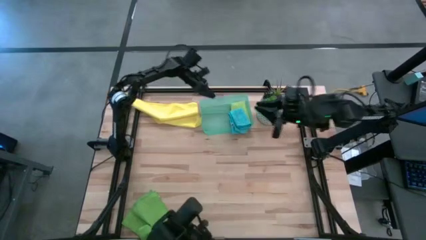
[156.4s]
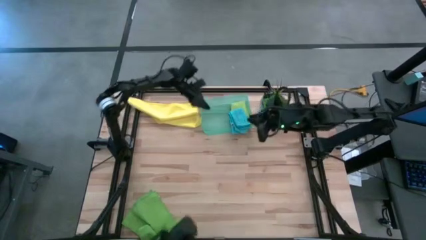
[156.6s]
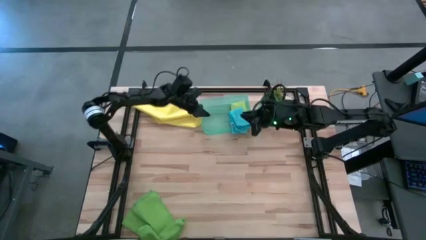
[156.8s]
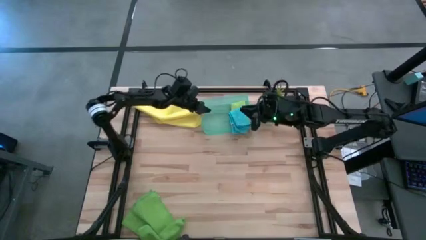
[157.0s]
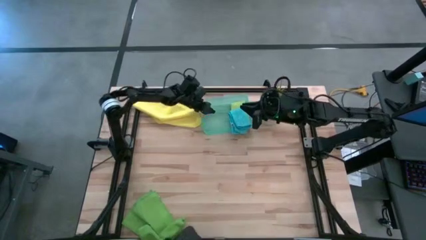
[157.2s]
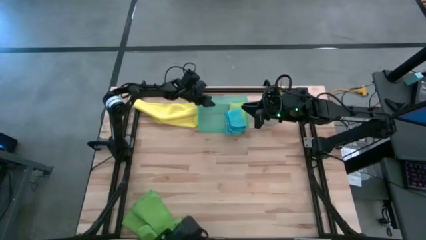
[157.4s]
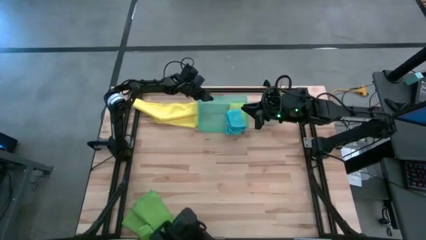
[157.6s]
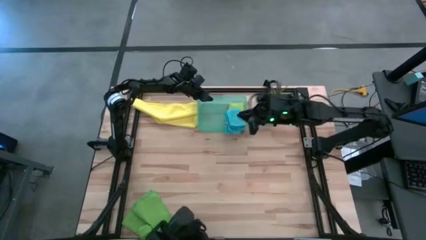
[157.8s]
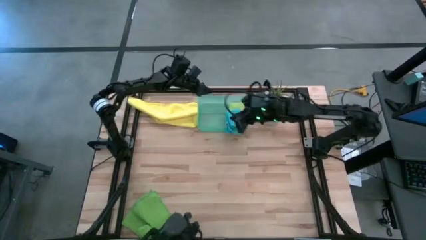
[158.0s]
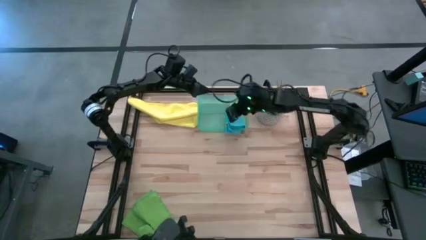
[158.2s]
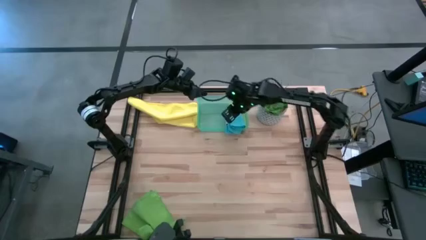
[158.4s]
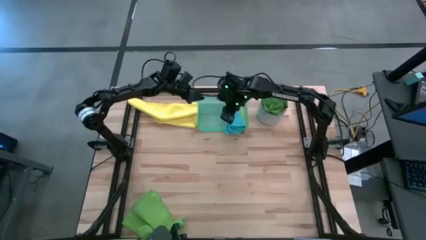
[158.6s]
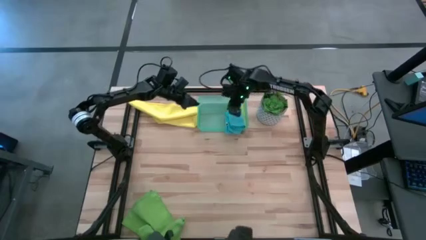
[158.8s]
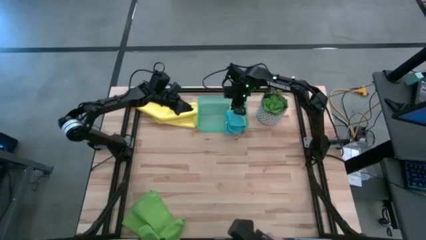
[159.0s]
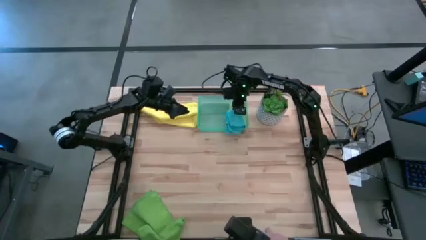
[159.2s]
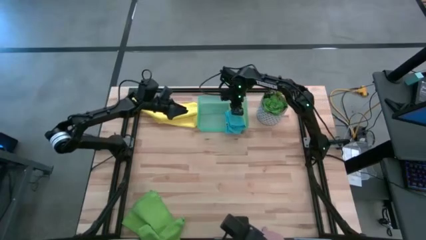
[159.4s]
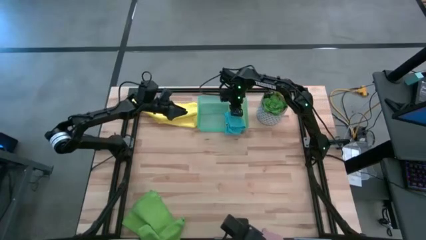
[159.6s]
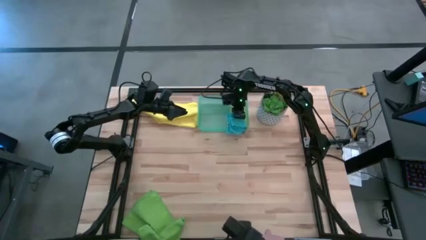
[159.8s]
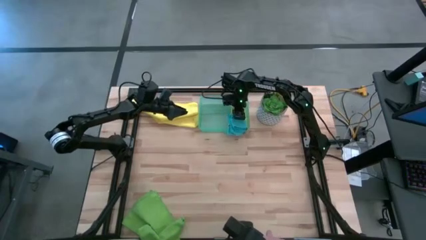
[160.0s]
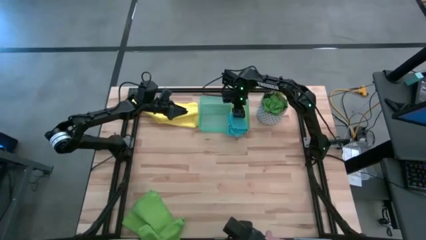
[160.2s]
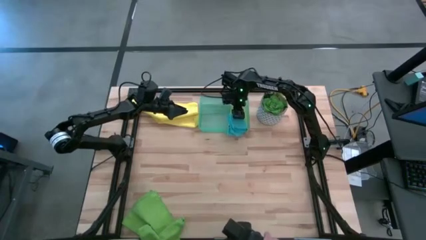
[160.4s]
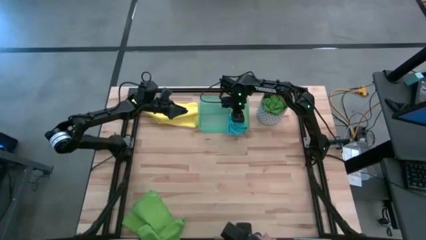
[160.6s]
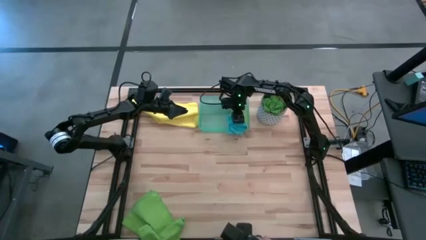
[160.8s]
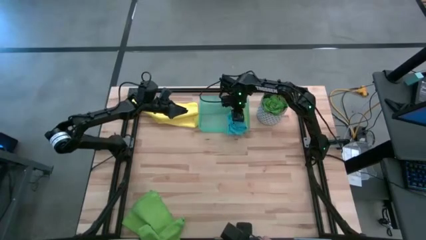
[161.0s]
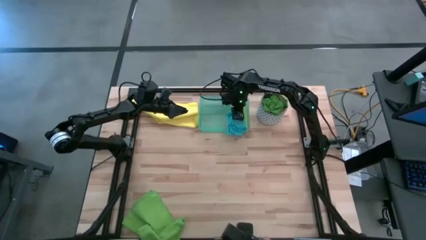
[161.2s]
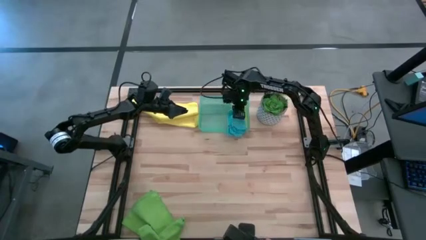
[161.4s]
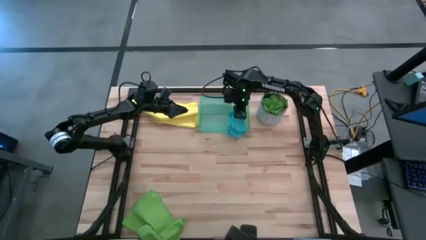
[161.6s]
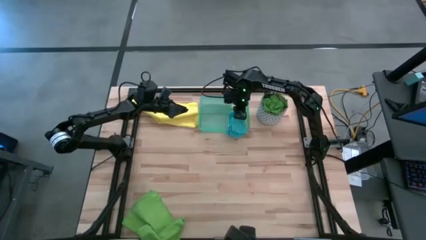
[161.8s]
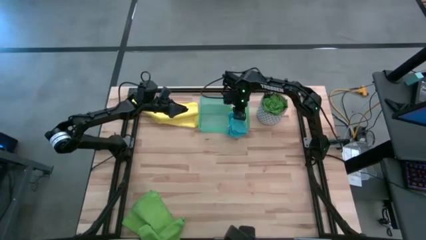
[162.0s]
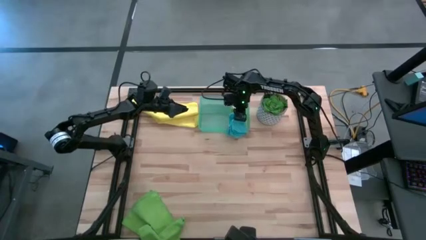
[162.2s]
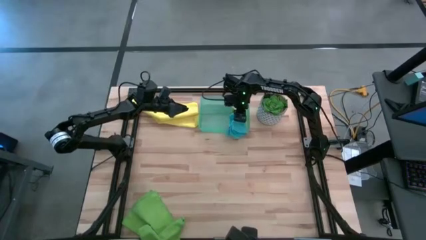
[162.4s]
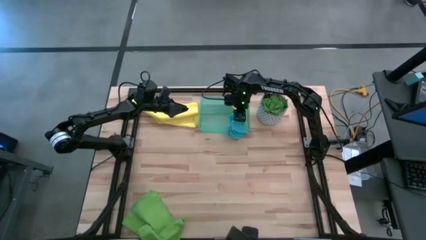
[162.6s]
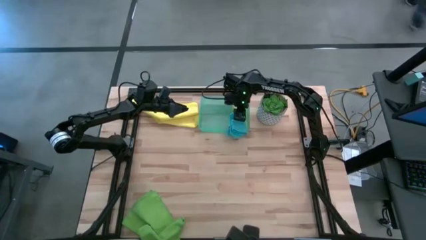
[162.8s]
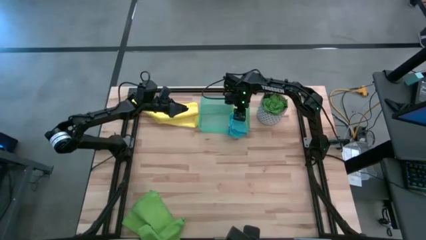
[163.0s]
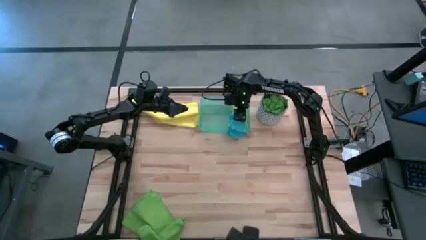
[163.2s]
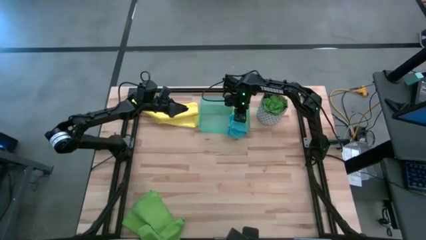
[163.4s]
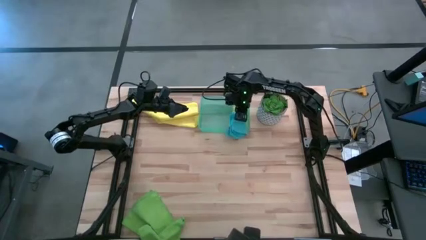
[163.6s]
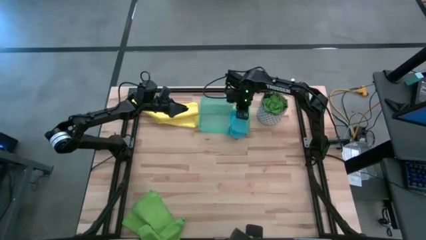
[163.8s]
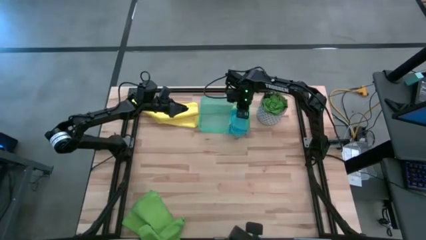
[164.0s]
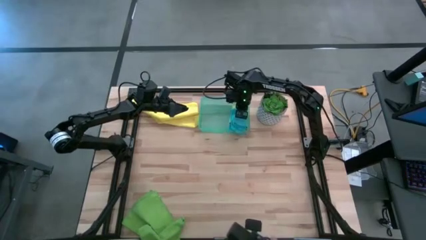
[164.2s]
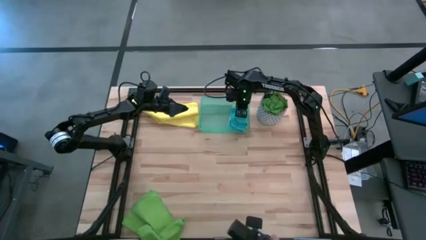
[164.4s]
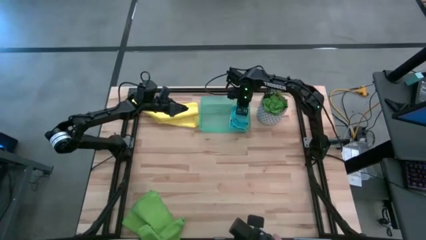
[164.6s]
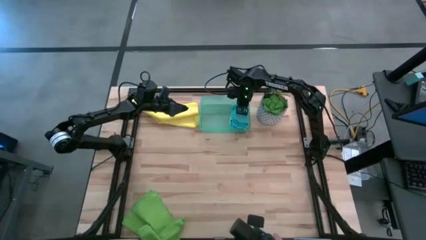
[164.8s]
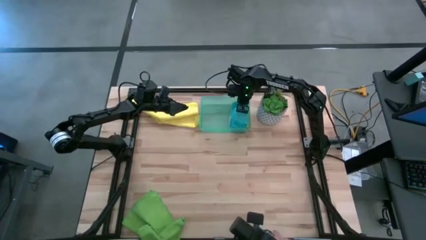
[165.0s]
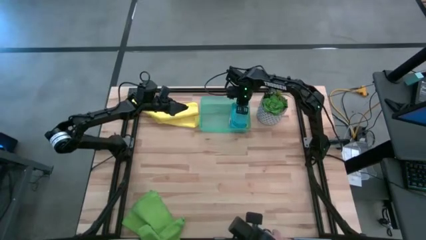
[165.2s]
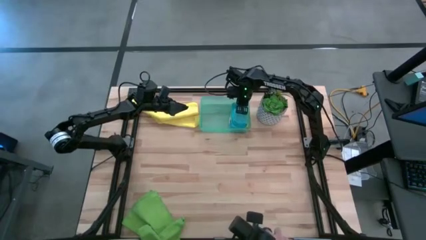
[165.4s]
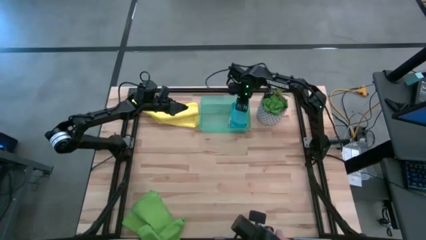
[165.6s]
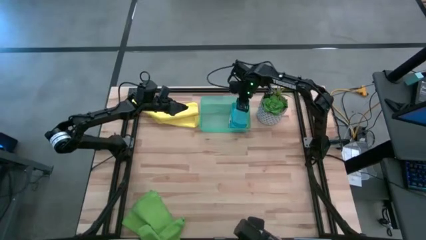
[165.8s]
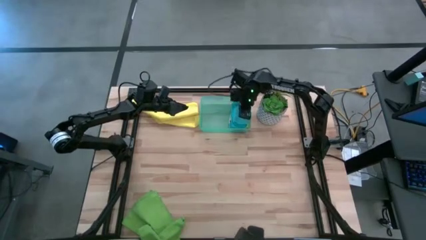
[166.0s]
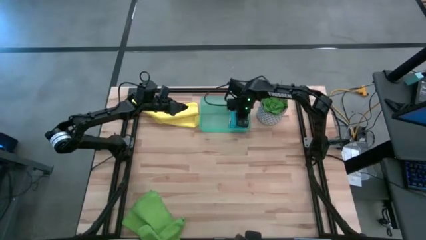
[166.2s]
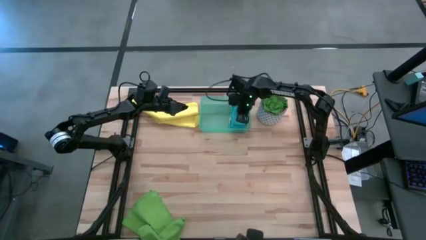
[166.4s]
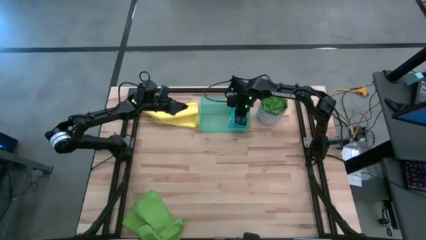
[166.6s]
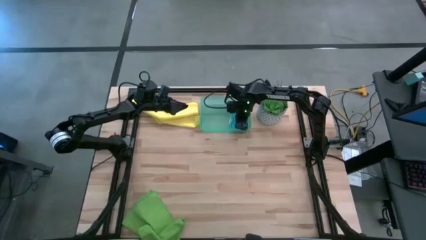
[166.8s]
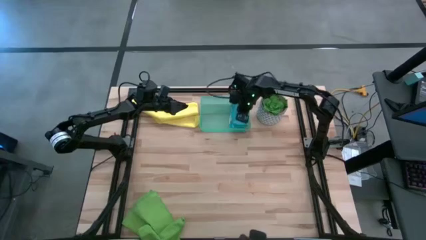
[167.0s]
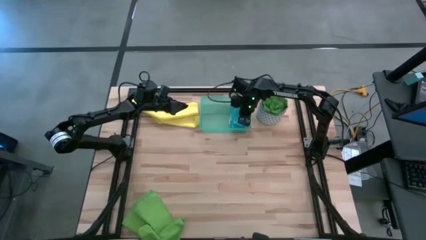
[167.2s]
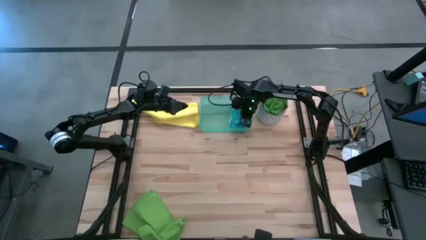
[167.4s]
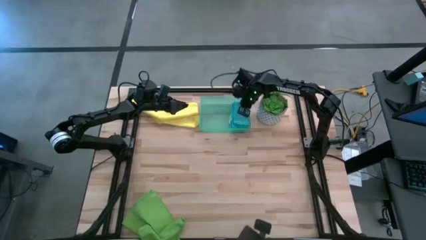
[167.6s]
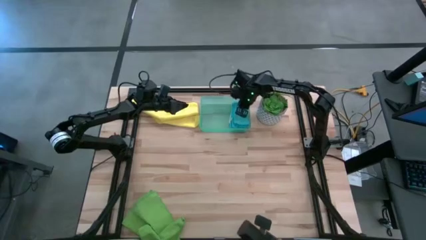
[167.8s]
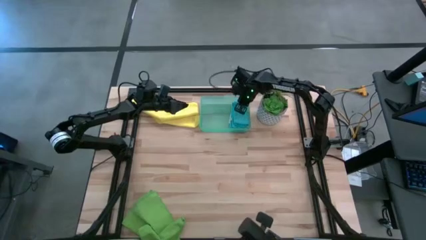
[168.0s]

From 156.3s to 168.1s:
Task: Fold microfiber towels
Put the blue microfiber cloth into the blue bin

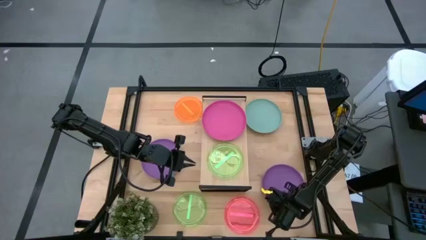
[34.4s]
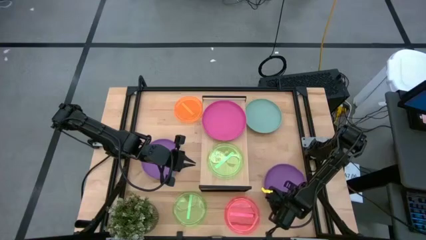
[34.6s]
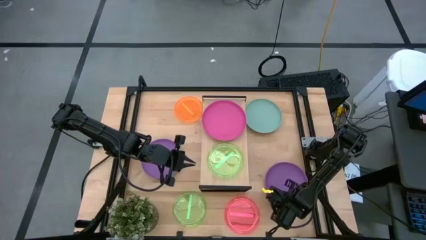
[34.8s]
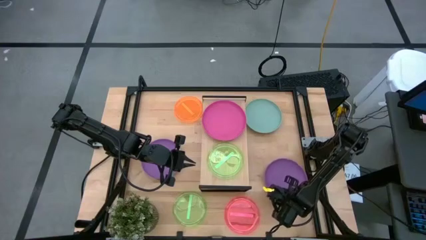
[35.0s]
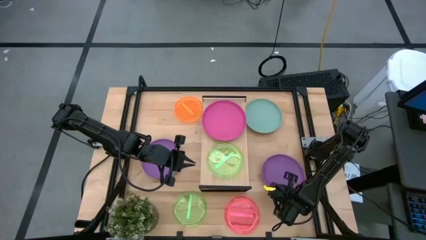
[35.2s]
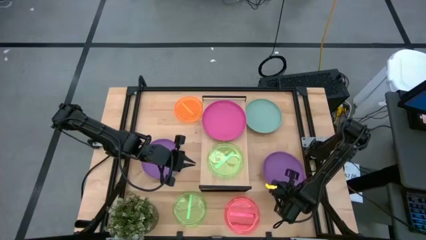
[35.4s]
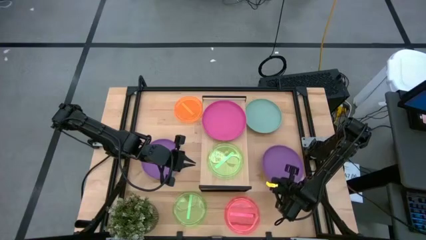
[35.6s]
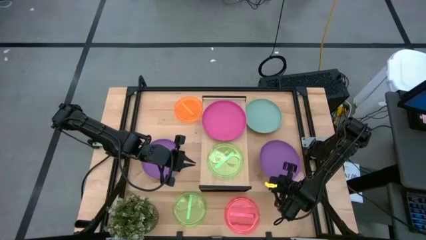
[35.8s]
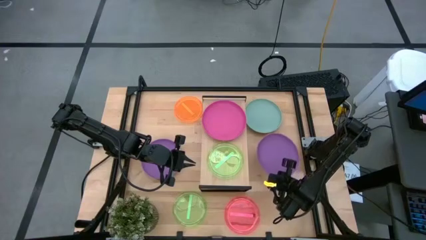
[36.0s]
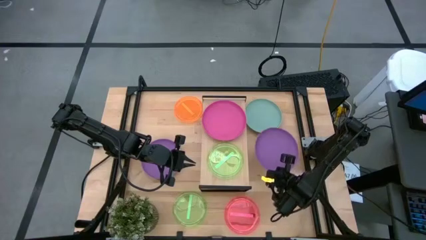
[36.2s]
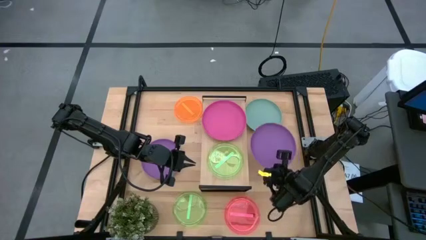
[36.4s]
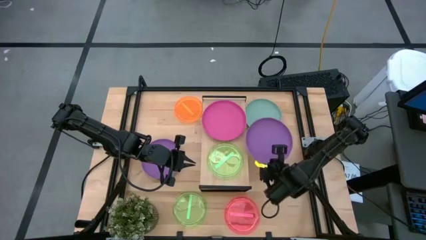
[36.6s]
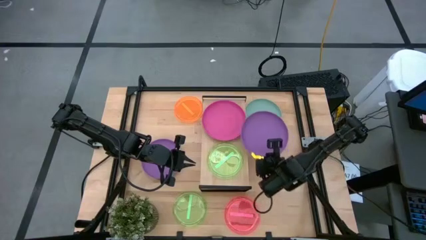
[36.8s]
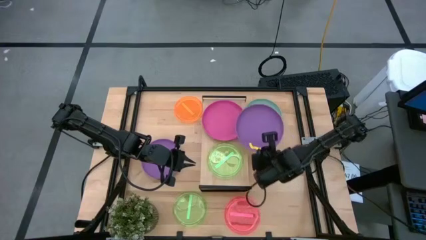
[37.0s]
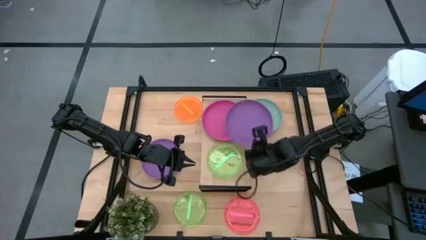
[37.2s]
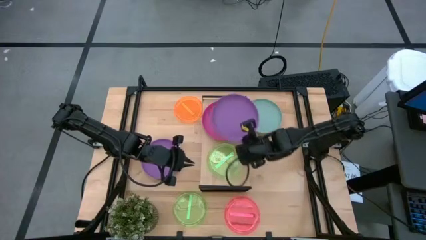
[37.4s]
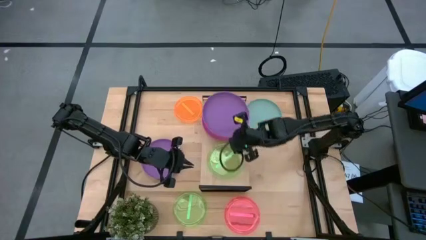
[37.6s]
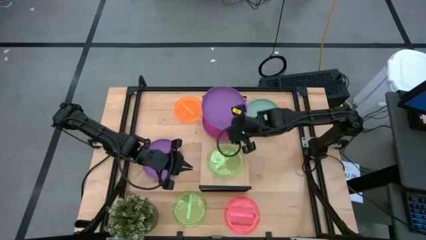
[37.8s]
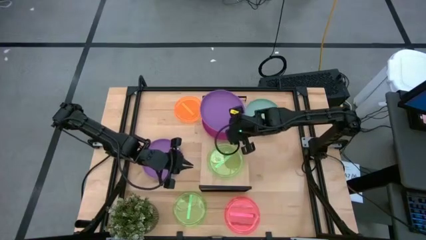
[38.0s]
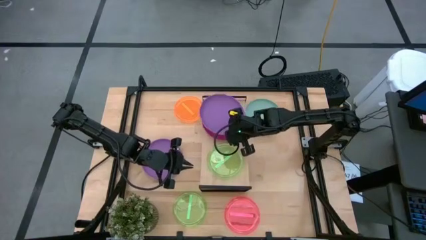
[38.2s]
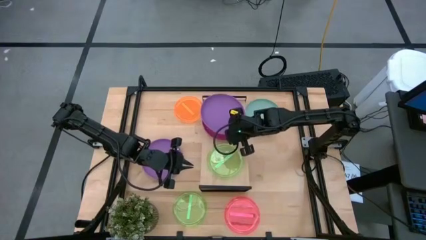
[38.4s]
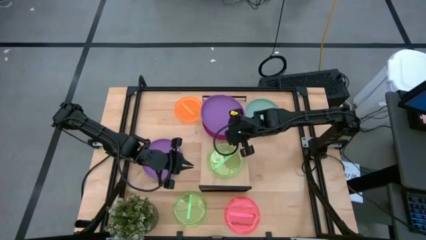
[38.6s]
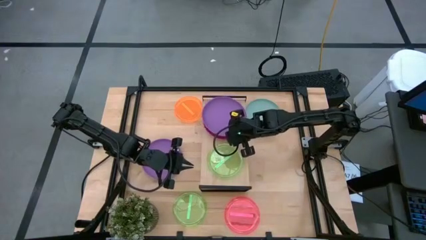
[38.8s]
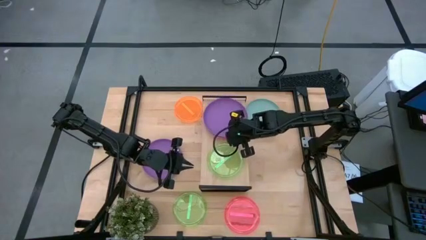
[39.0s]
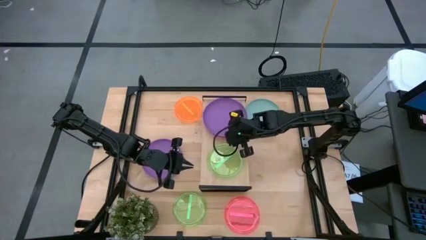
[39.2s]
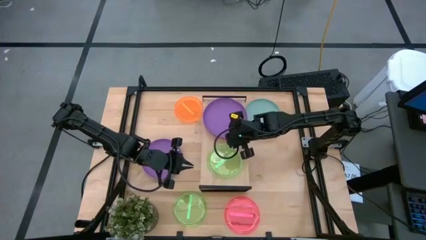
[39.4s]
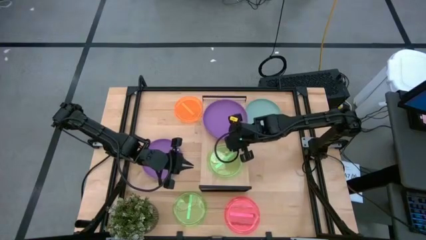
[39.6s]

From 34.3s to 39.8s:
Task: Place and stack plates onto a shelf
Stack the violet plate on top of the pink plate on the shelf
